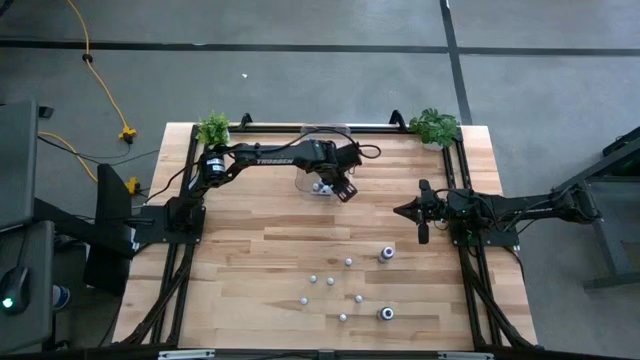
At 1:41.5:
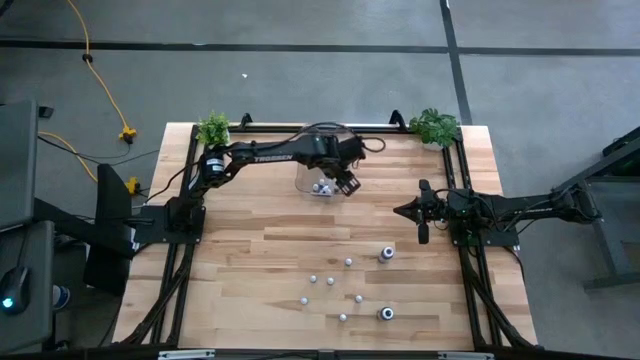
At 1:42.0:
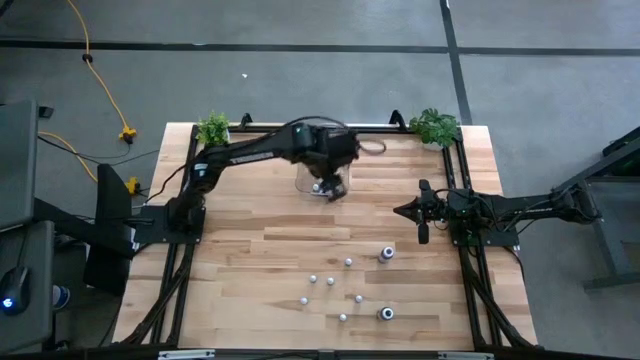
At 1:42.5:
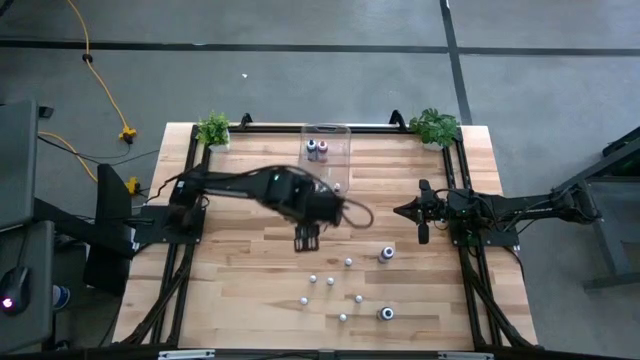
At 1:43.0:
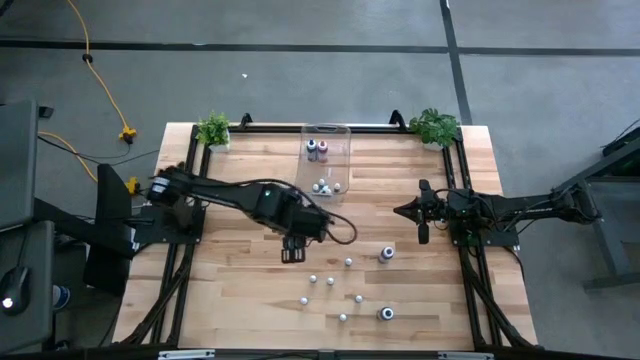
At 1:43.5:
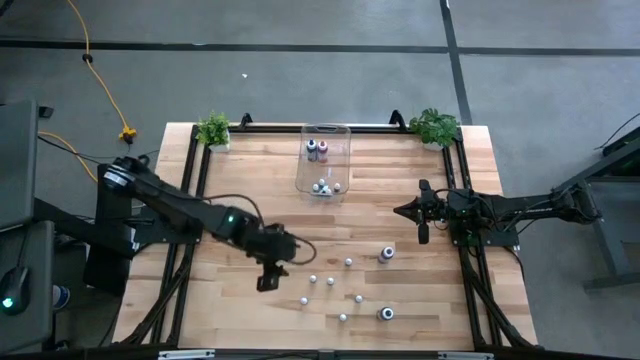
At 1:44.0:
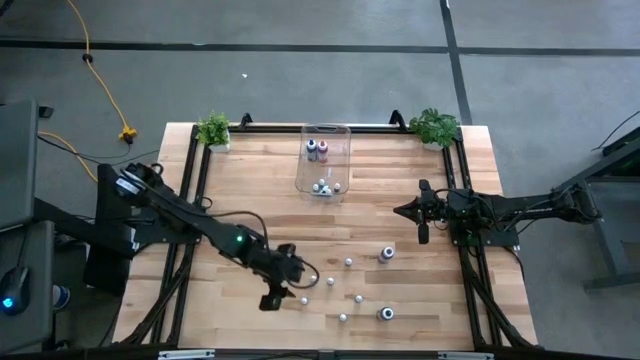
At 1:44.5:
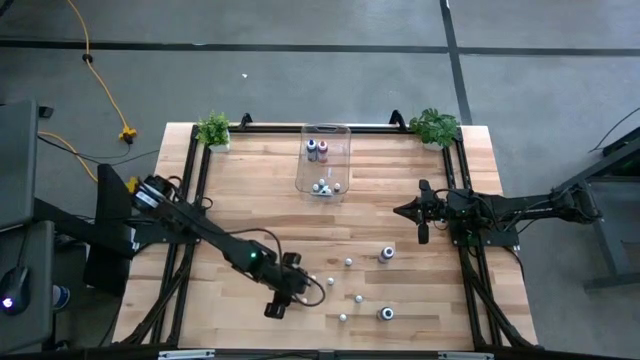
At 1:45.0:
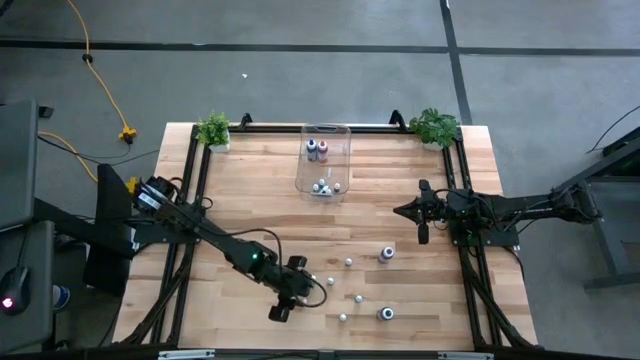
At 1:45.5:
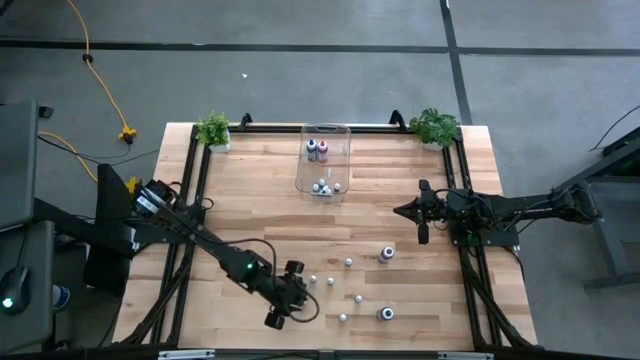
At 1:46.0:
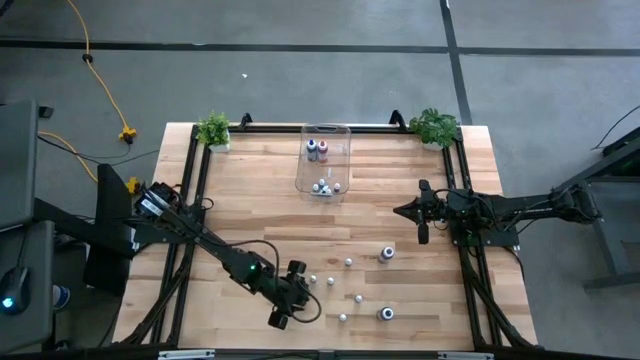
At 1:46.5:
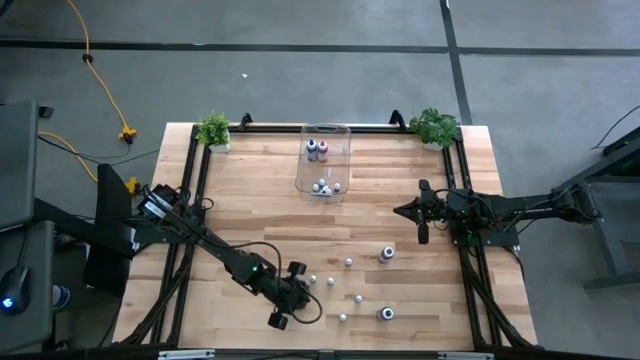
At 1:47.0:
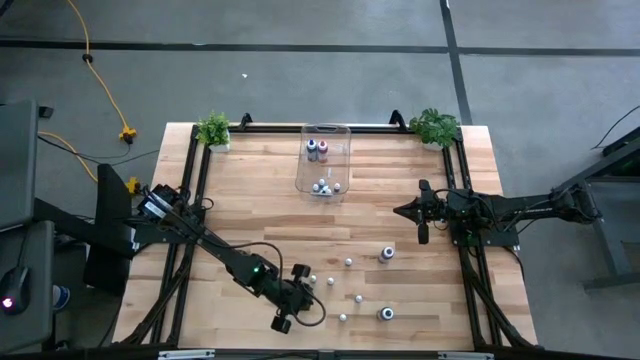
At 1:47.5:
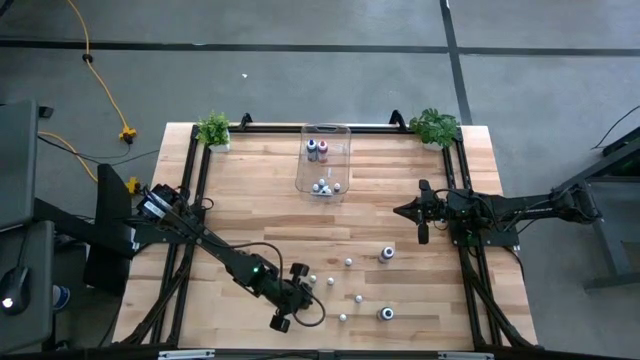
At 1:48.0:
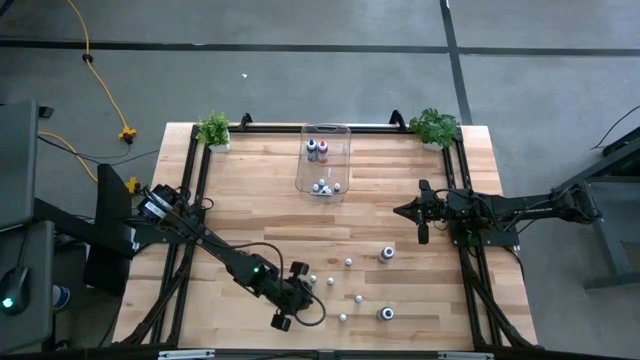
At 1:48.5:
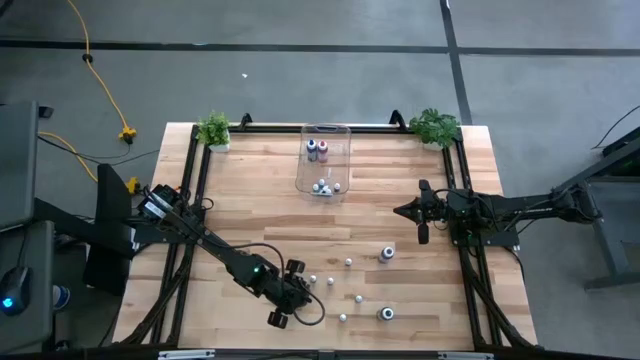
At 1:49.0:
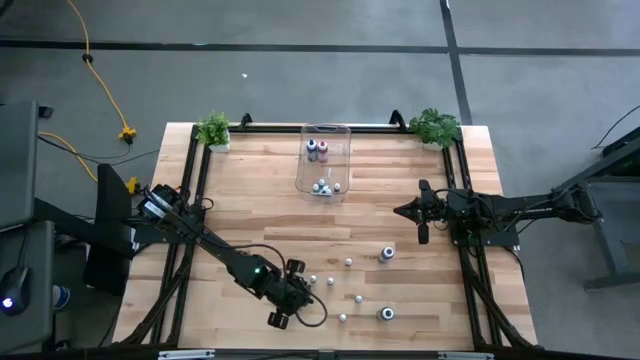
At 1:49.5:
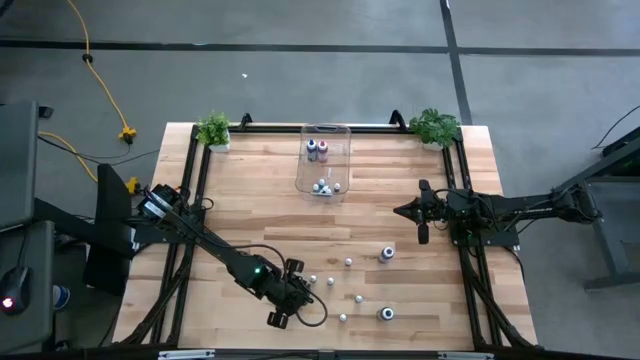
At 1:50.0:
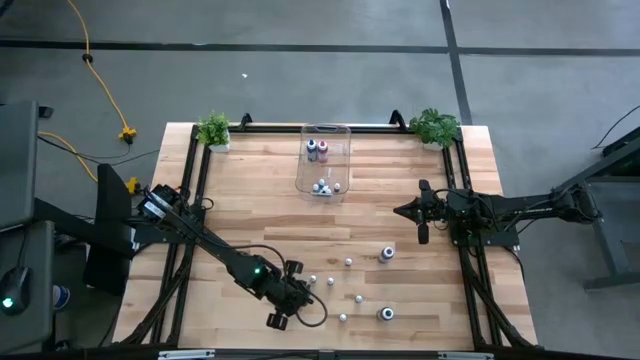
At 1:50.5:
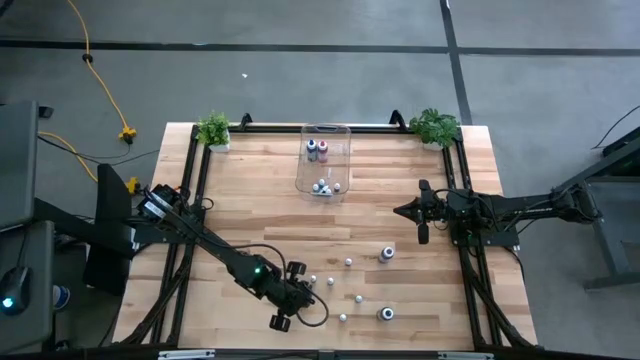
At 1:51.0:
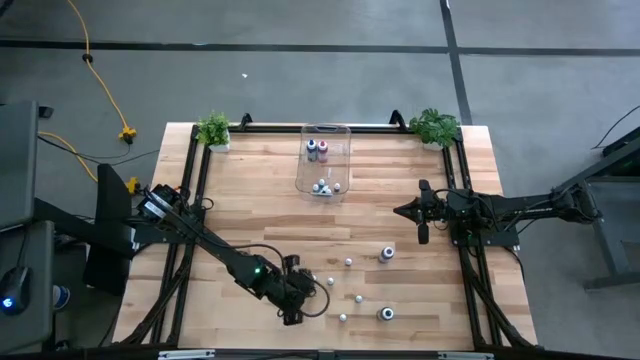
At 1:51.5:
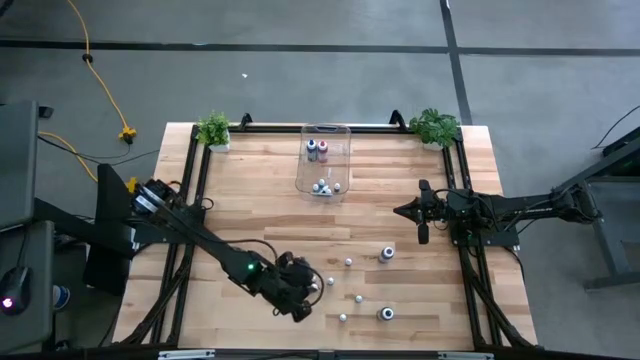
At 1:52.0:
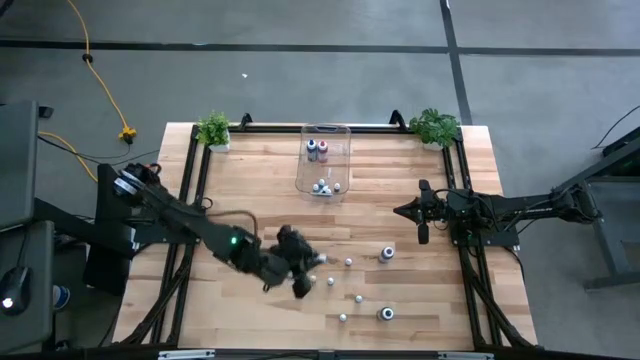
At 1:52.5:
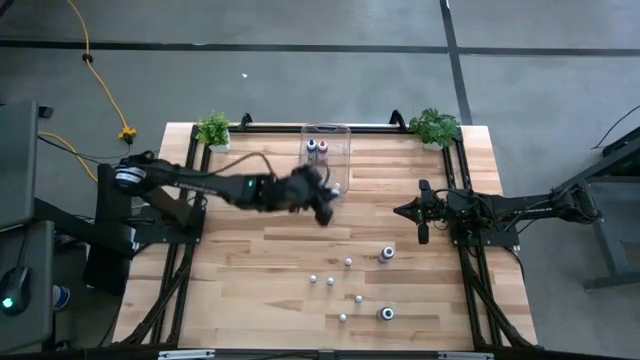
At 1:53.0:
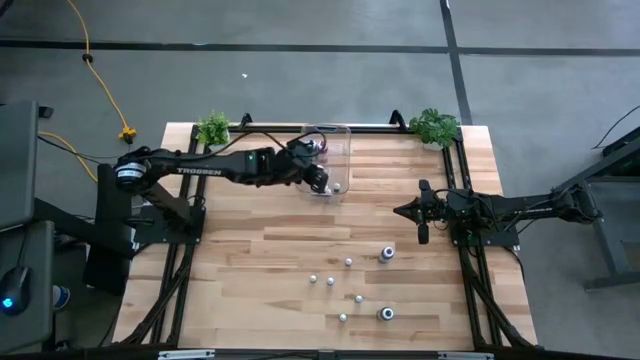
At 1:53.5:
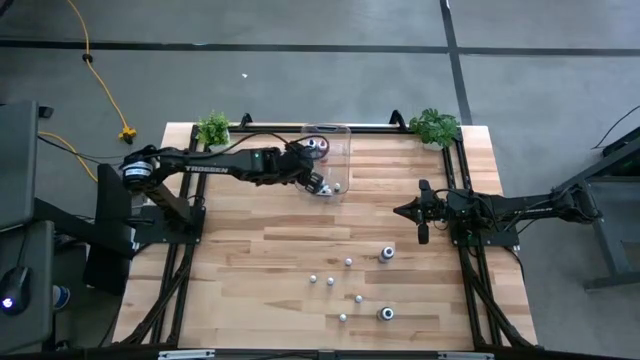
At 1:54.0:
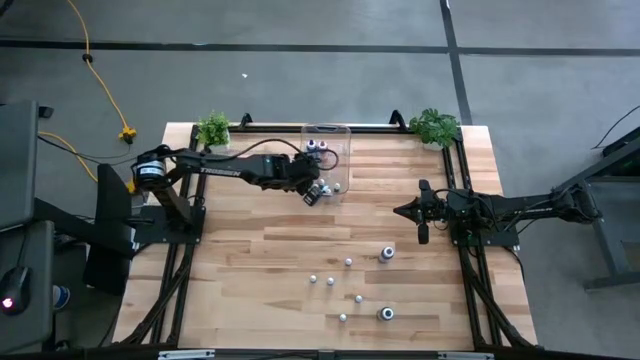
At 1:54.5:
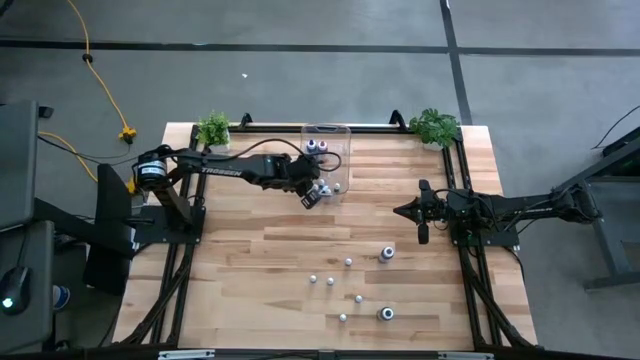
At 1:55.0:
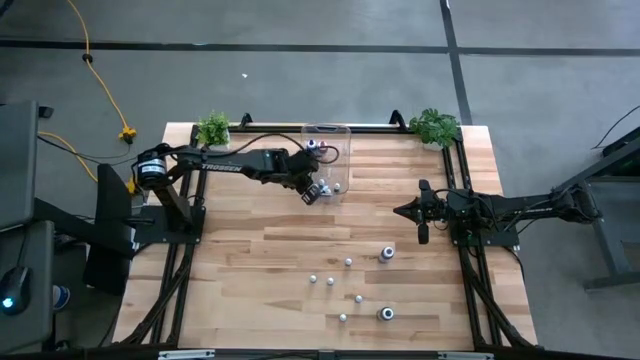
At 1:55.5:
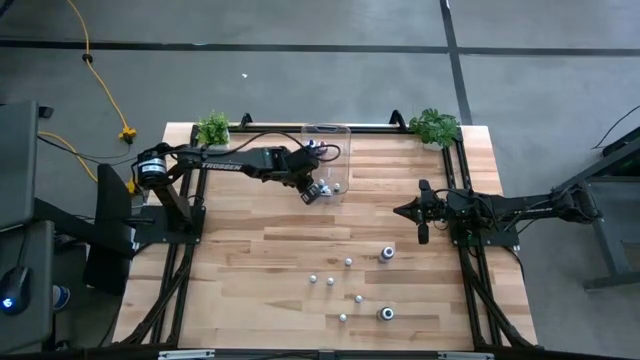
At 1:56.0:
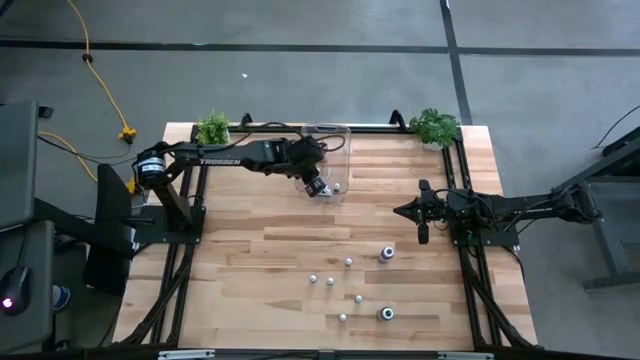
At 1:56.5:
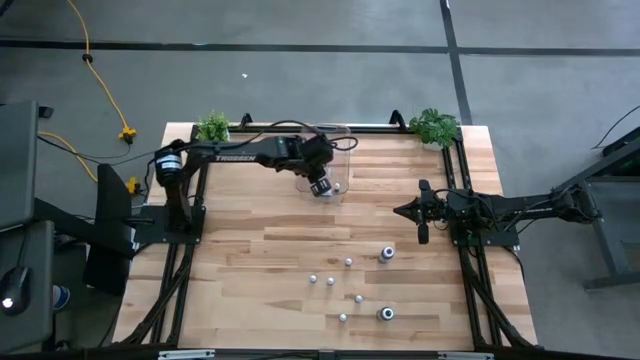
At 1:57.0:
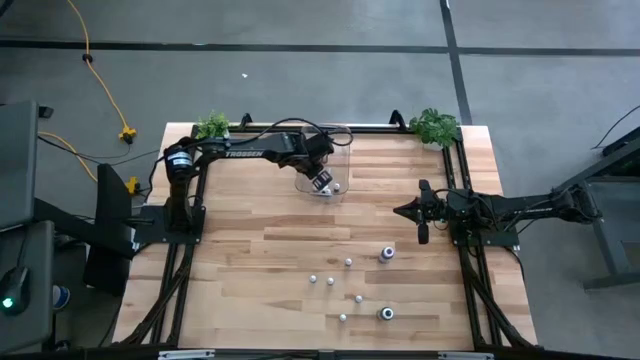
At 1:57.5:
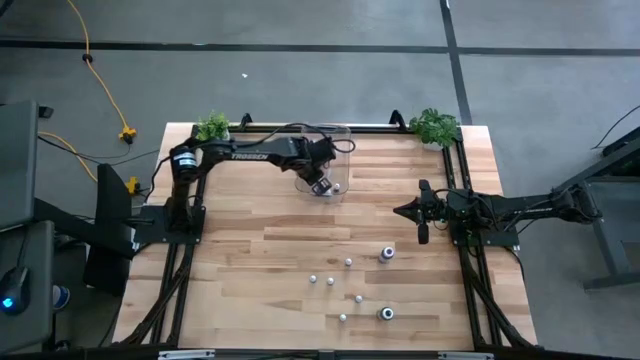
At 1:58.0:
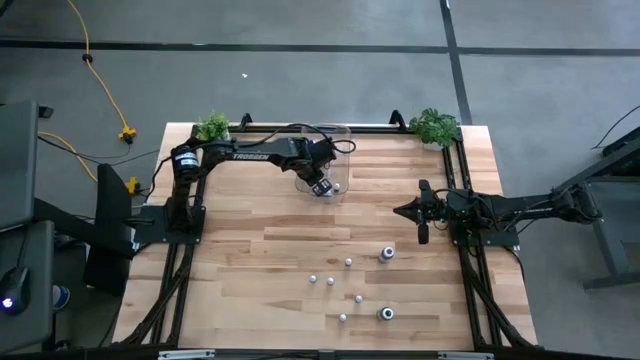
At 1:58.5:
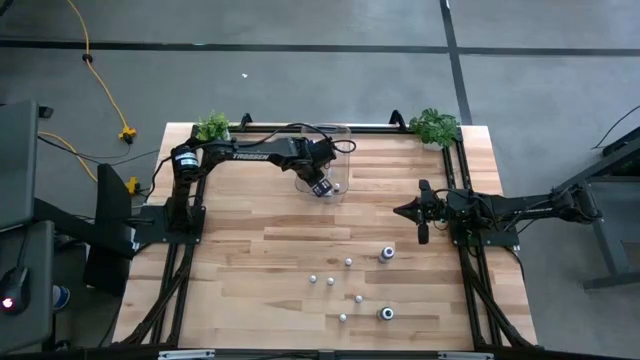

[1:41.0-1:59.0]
Task: Pick & Place food coloring
Put the small orange food coloring into the transparent bin

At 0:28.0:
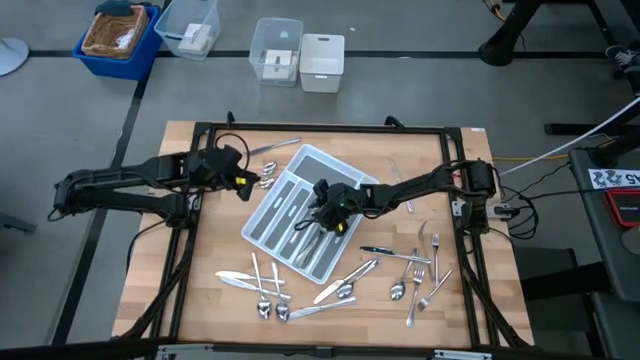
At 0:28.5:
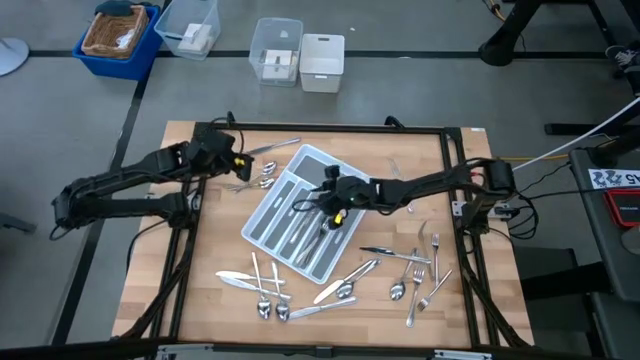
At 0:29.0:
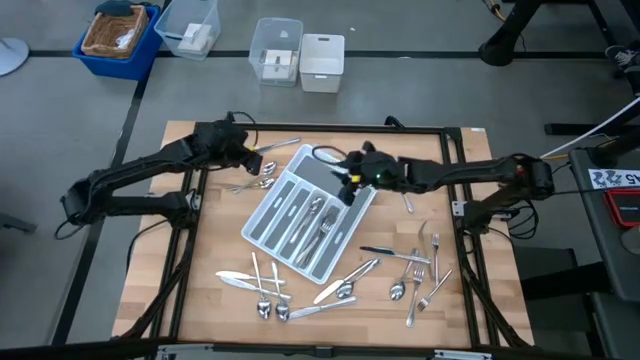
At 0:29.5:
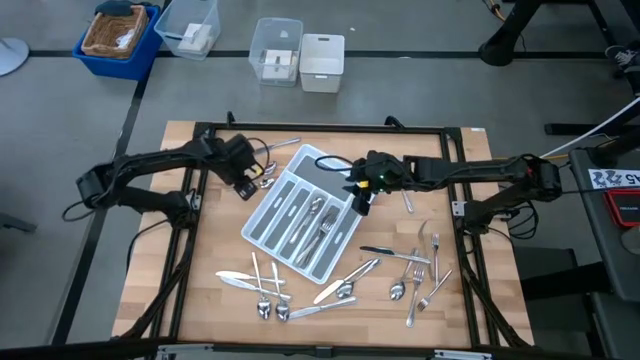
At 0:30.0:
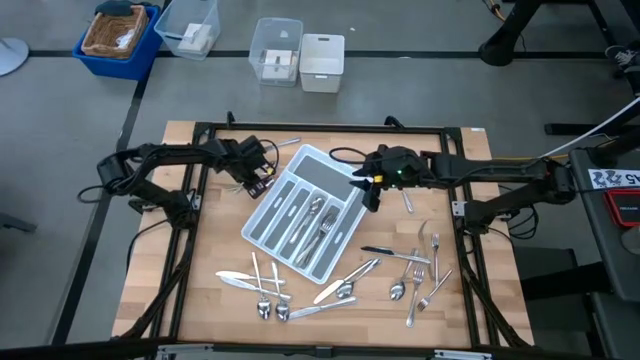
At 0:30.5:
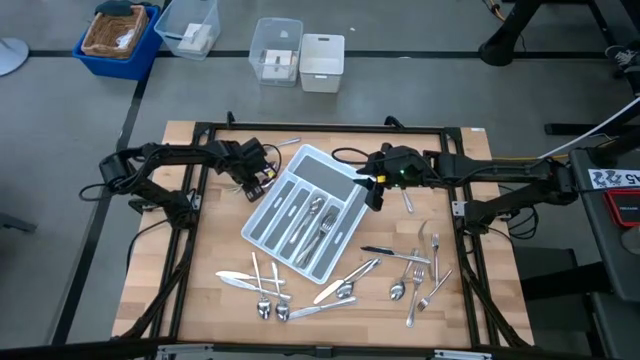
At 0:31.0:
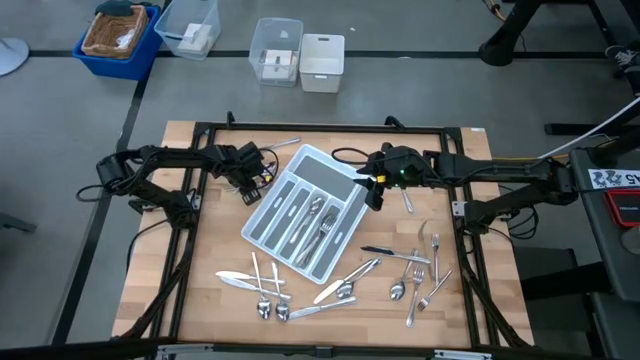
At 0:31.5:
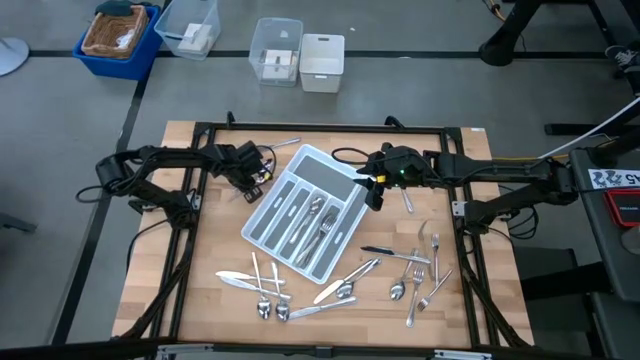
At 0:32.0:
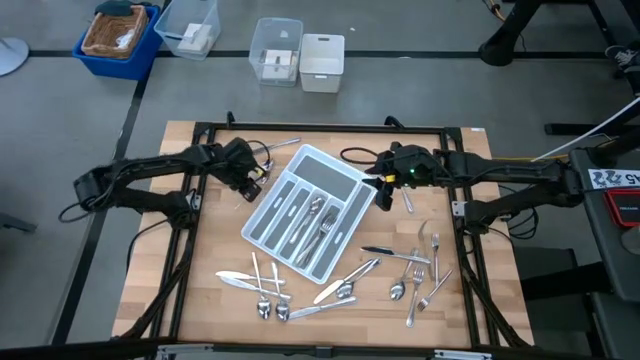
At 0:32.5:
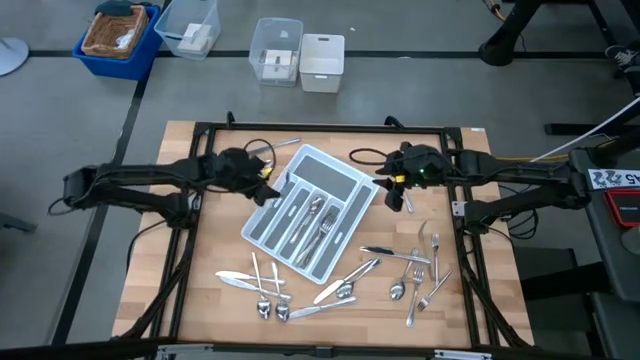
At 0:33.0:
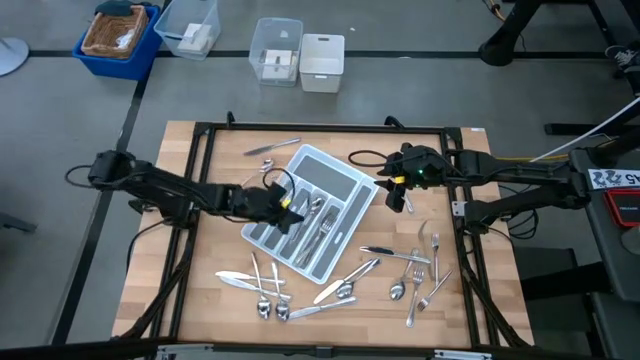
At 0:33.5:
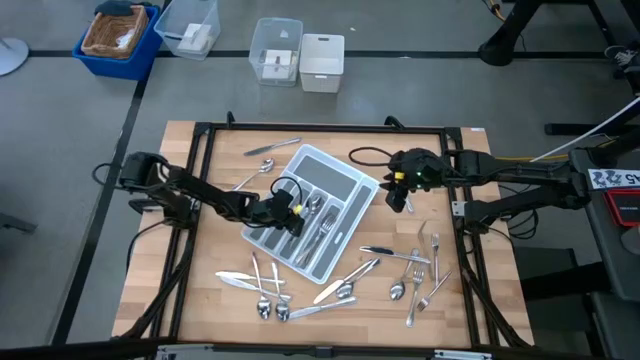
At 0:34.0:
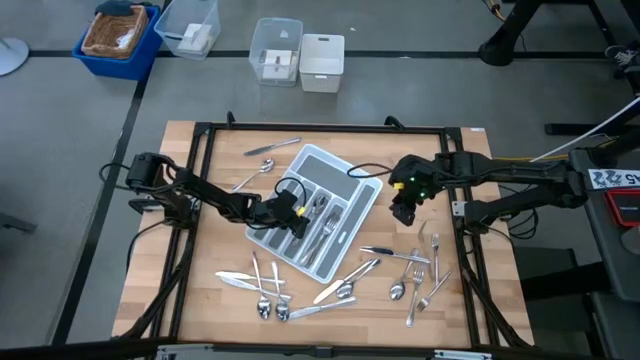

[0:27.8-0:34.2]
Task: Sort silverware
Put the silver spoon into the white cutlery tray
